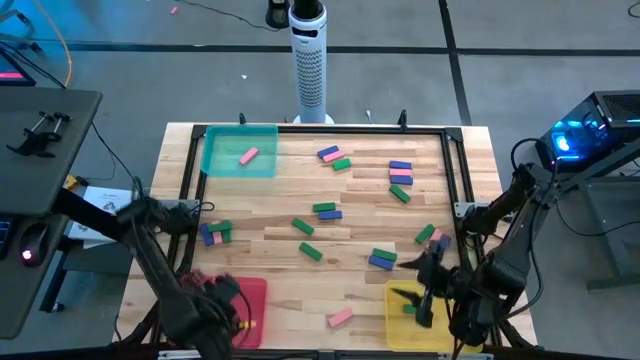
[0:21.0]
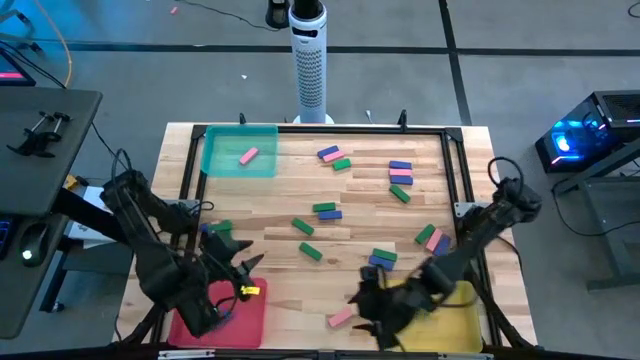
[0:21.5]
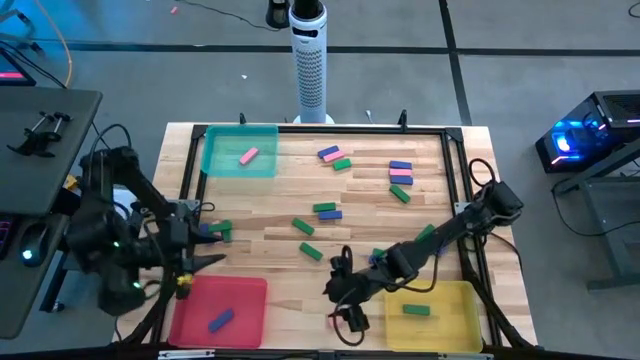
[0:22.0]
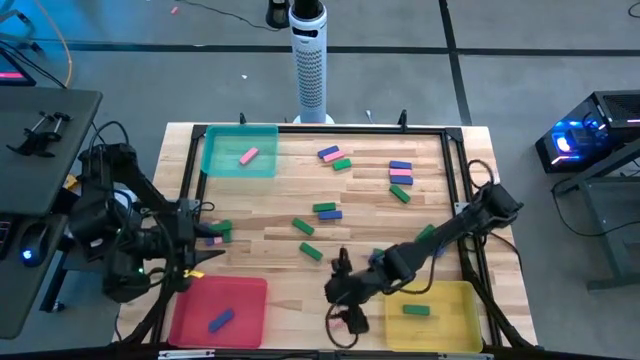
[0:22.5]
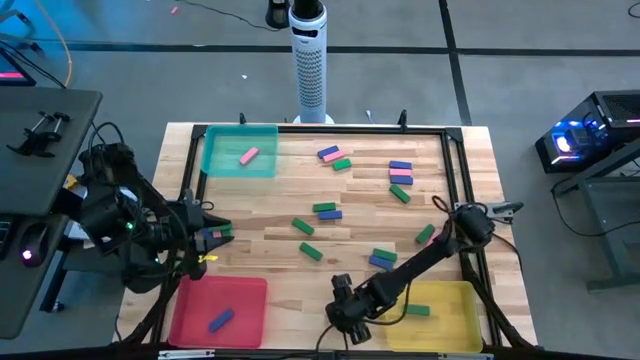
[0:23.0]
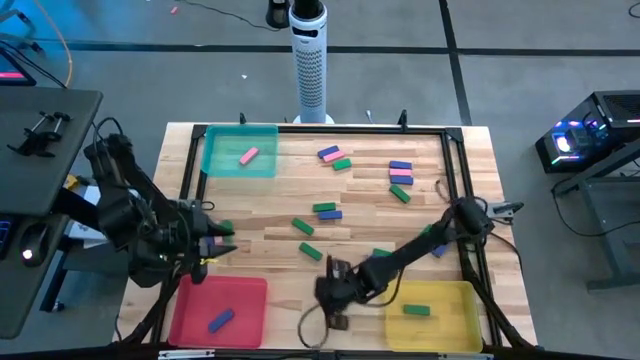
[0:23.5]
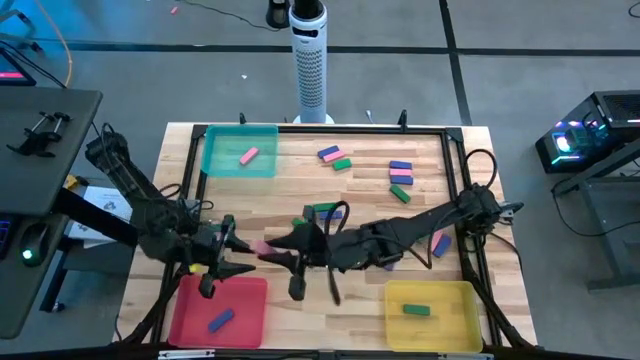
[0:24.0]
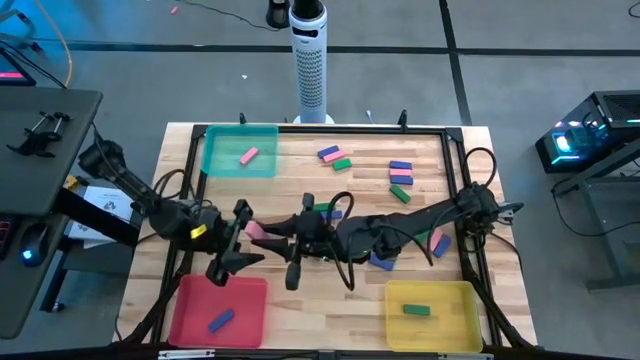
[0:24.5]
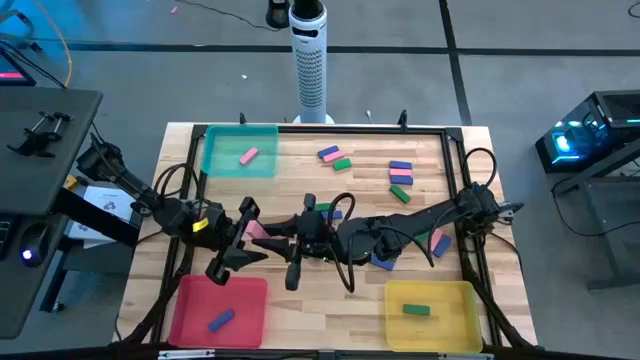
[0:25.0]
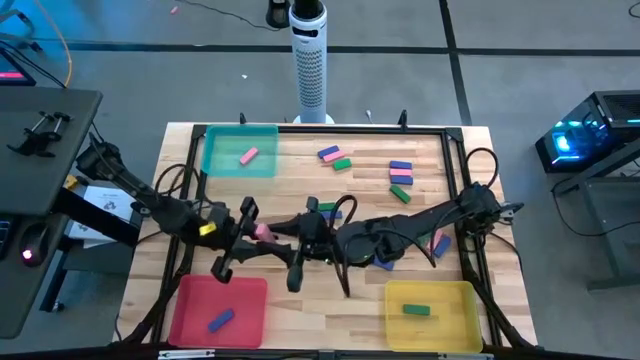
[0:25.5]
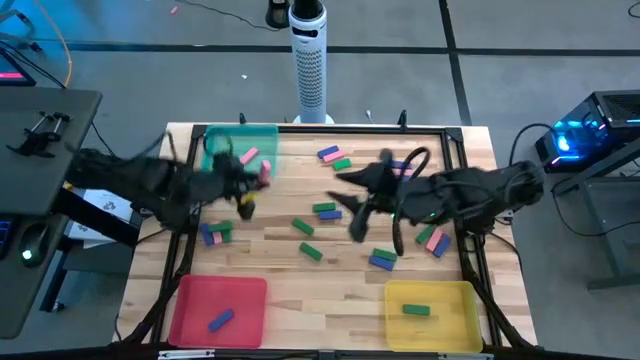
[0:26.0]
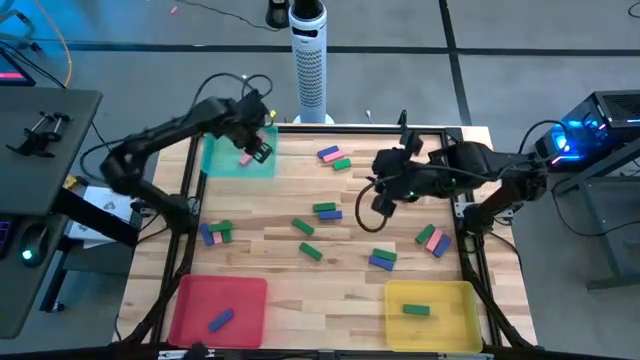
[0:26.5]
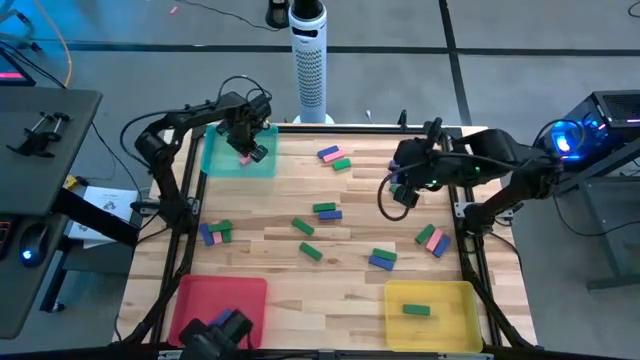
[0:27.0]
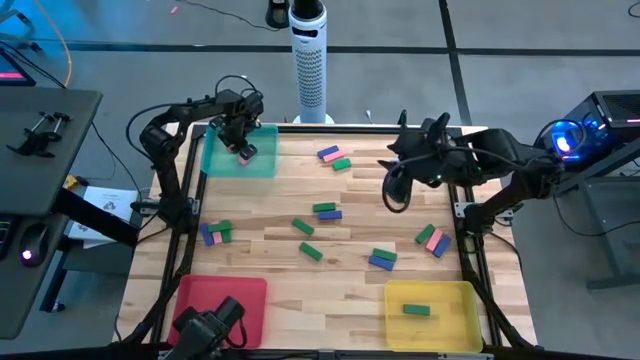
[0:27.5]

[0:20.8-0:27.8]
Task: Sort blocks
Put the pink block into the green bin

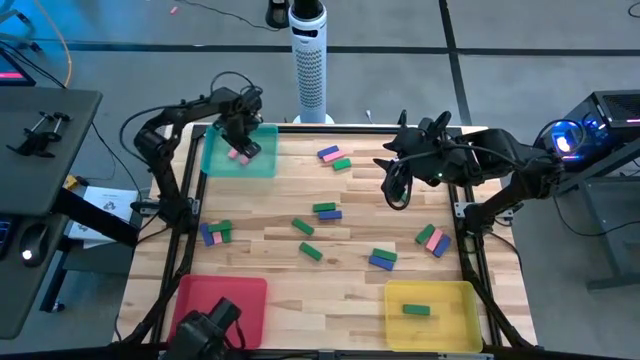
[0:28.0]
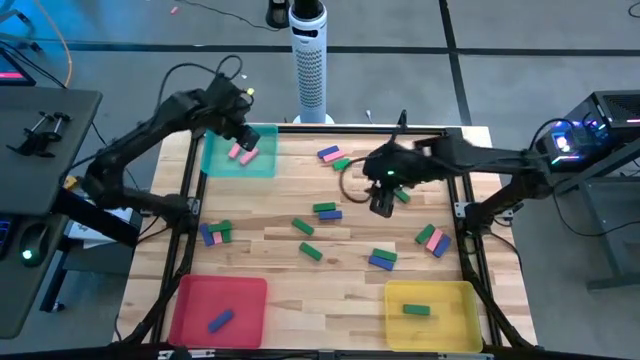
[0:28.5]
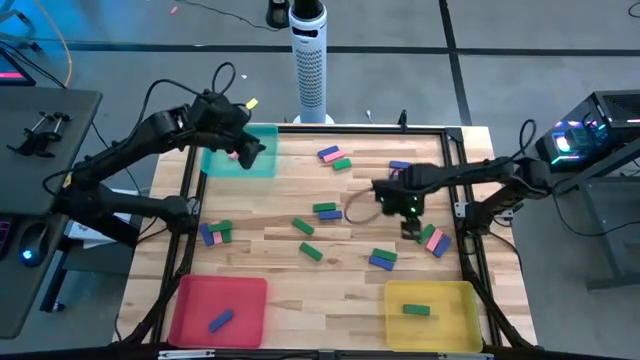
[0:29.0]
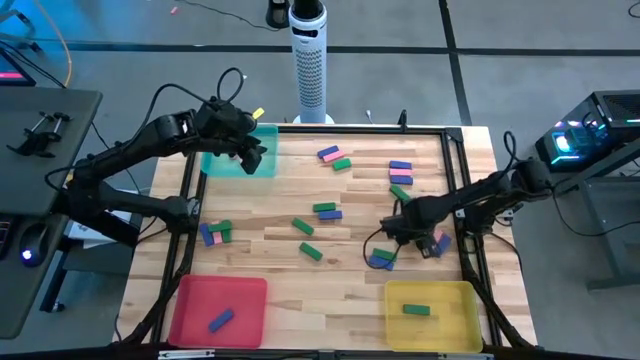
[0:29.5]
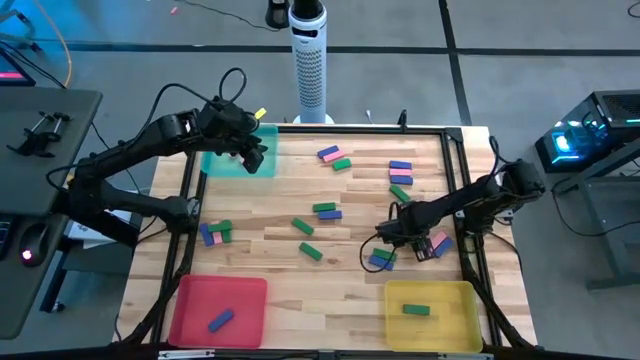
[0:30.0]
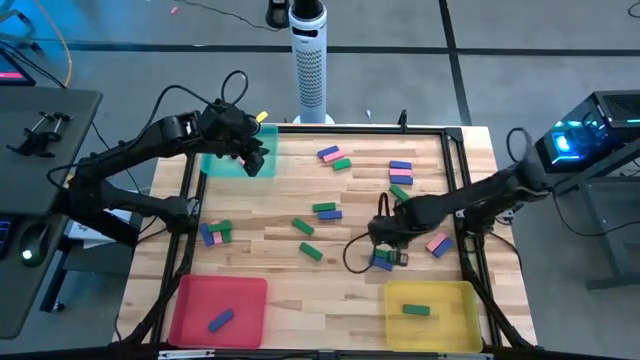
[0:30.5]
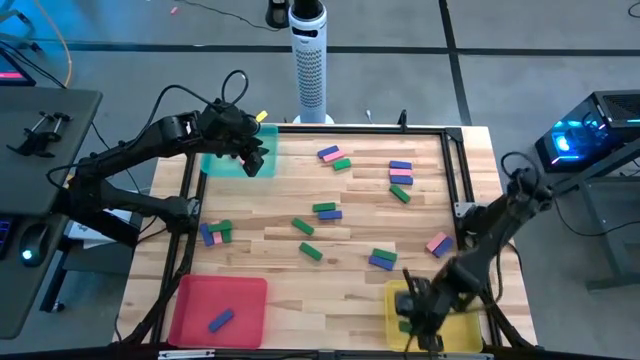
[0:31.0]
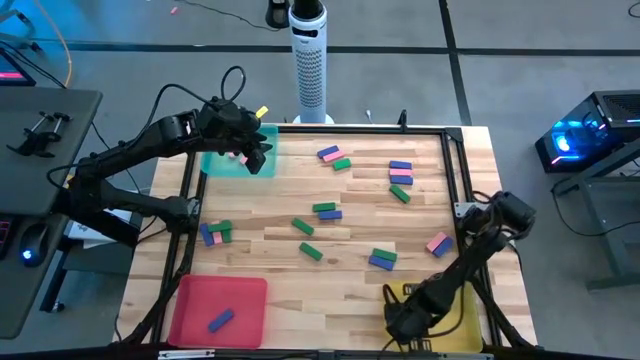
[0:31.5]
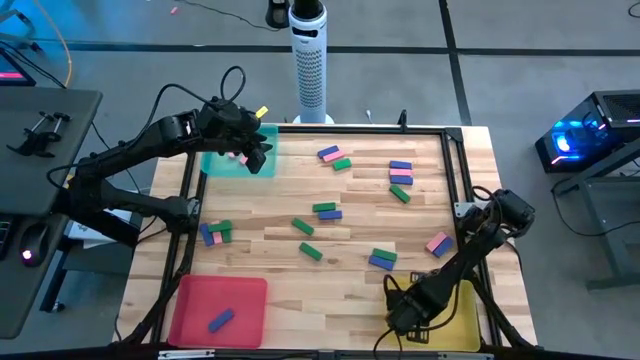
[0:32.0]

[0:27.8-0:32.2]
Put the green block into the yellow bin

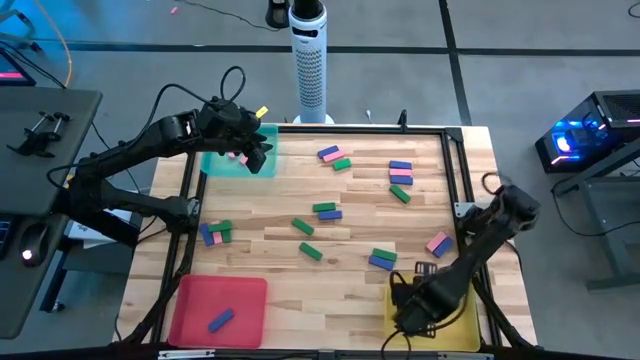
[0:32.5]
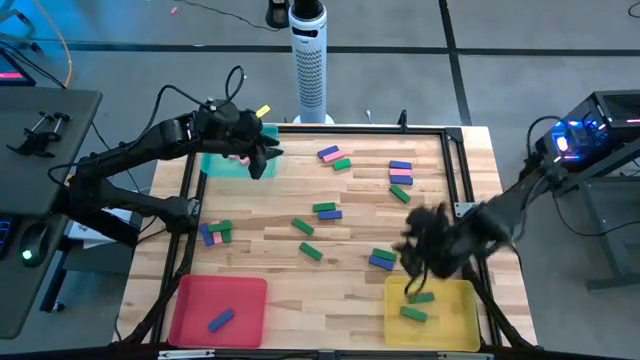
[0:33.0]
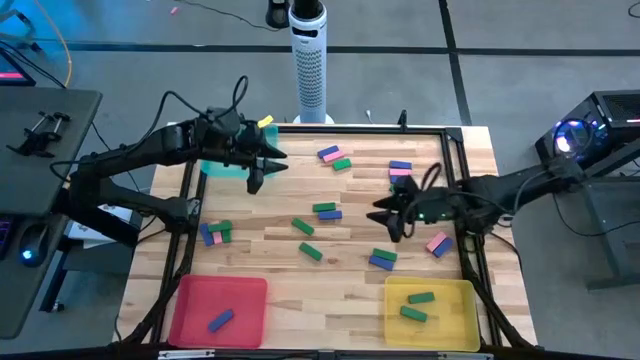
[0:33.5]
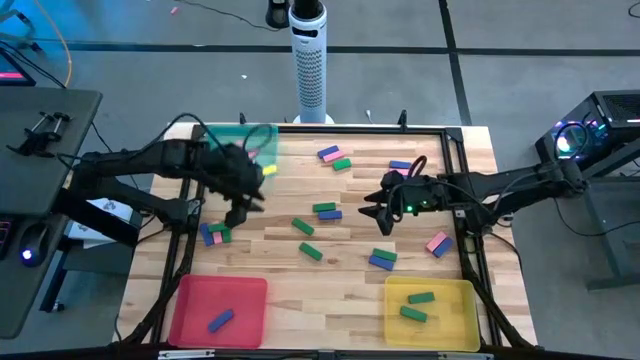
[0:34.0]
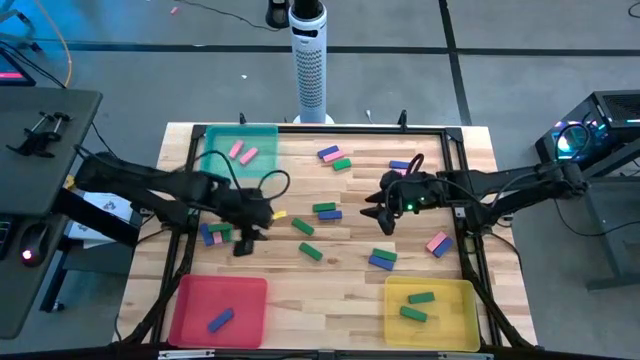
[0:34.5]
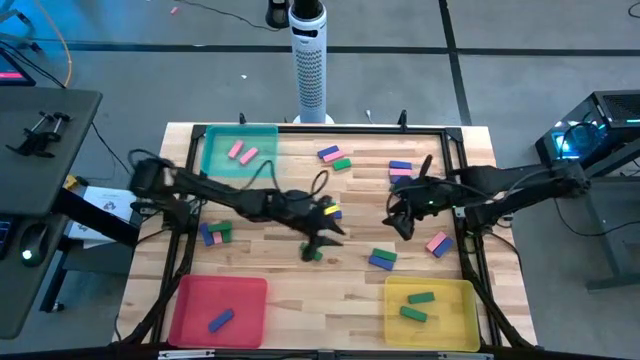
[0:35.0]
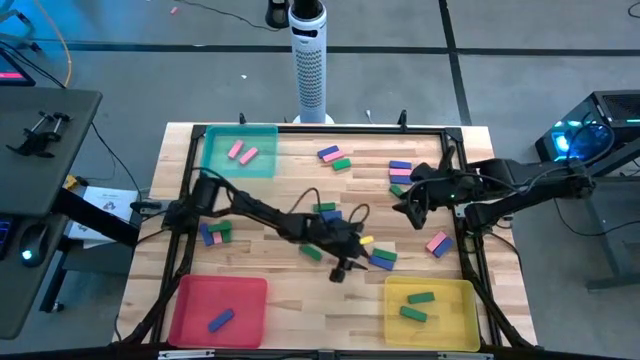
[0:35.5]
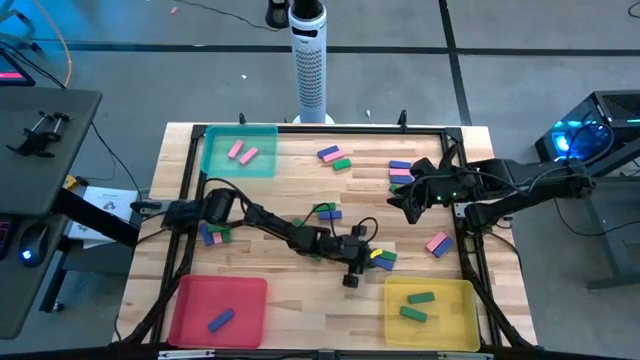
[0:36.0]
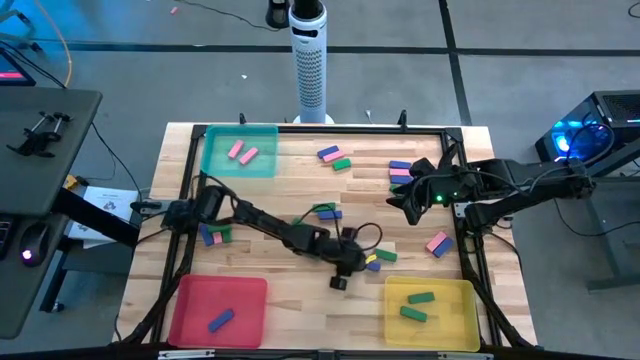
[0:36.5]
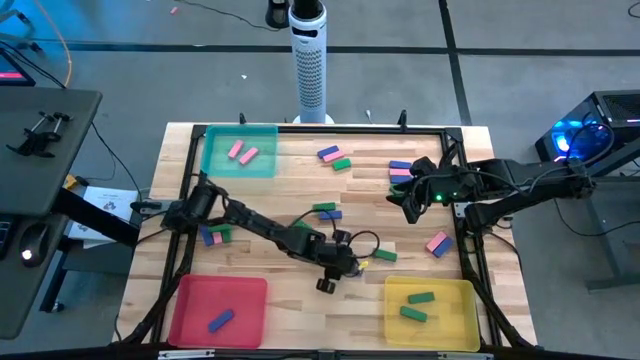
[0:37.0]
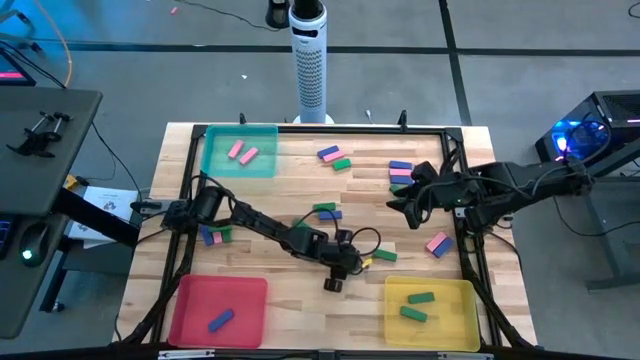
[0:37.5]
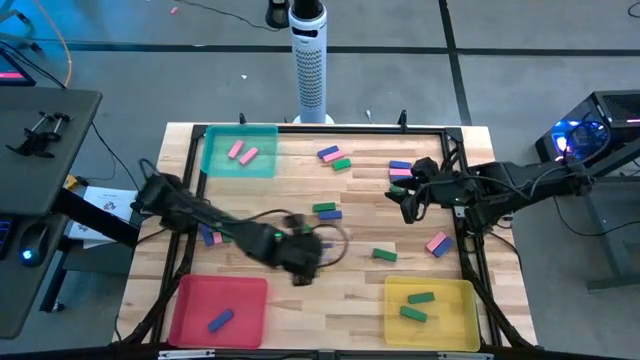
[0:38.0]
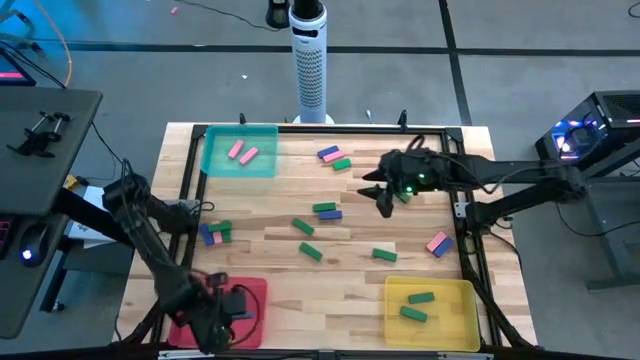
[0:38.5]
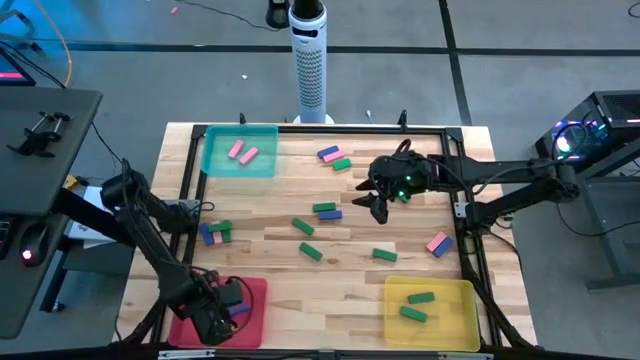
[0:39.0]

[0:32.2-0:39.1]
Put the blue block into the red bin

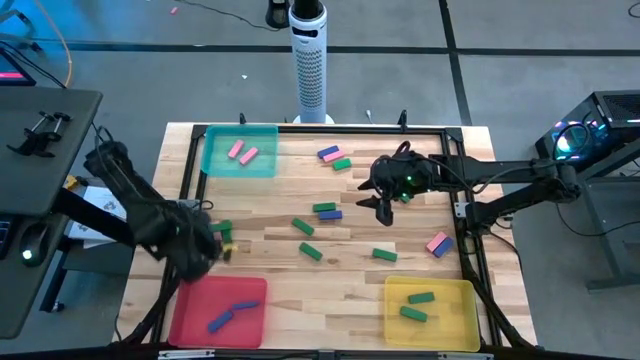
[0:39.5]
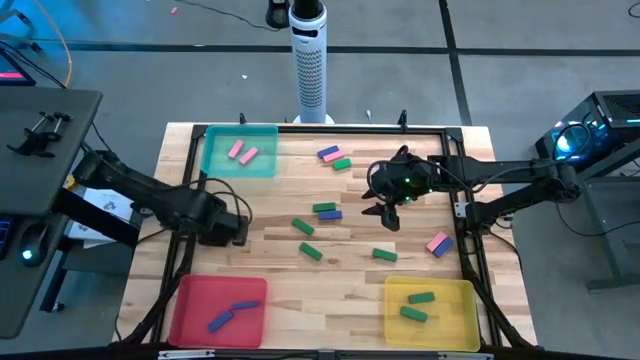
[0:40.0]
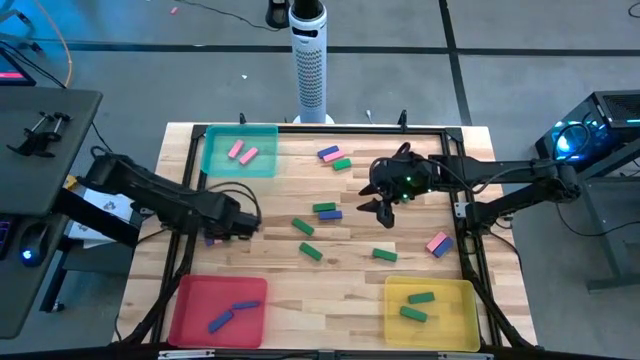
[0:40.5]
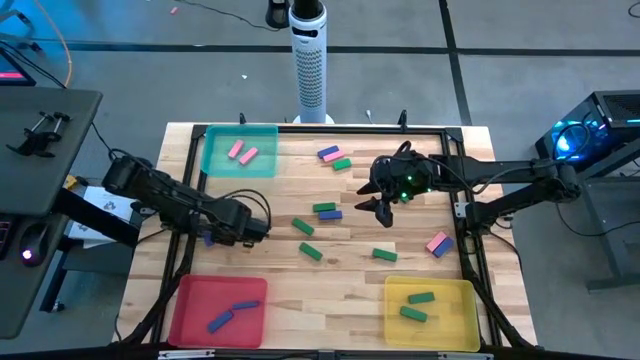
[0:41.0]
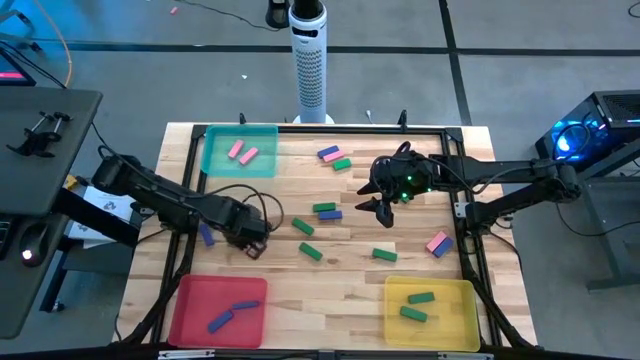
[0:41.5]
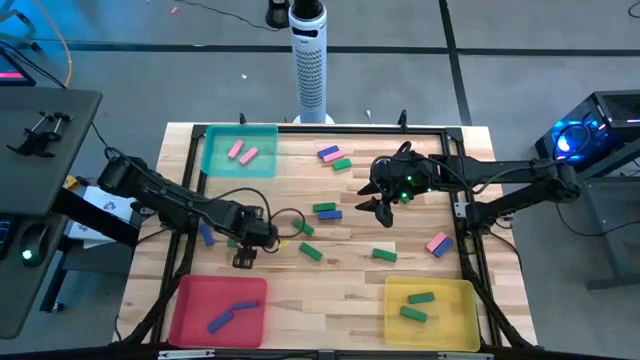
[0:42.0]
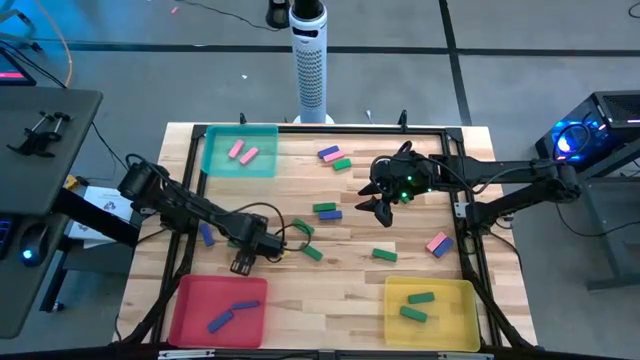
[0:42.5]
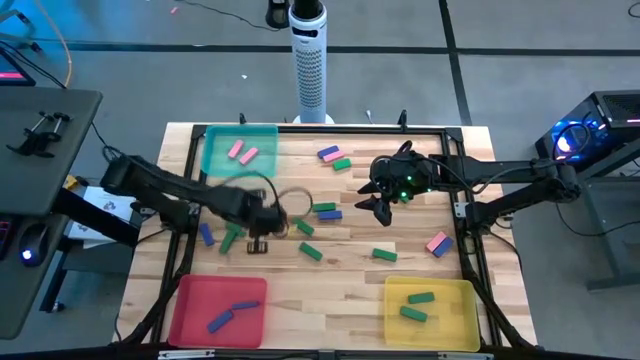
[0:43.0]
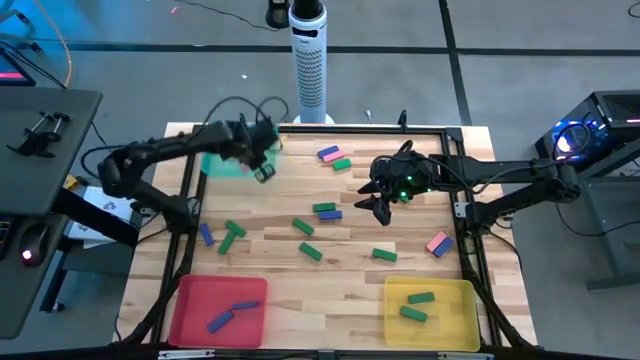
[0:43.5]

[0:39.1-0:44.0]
Put the pink block into the green bin
